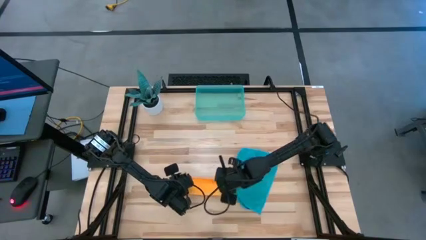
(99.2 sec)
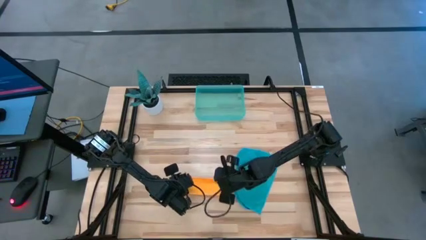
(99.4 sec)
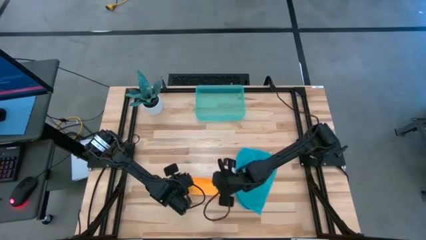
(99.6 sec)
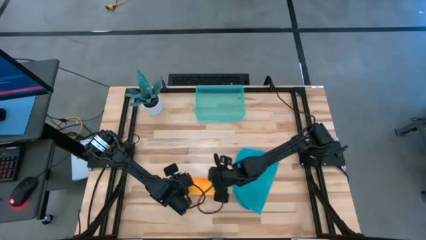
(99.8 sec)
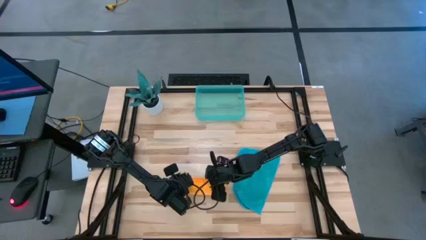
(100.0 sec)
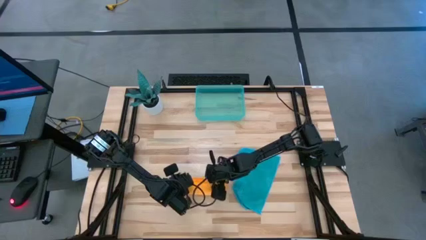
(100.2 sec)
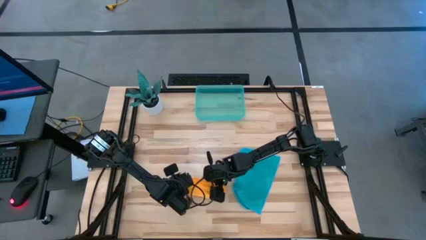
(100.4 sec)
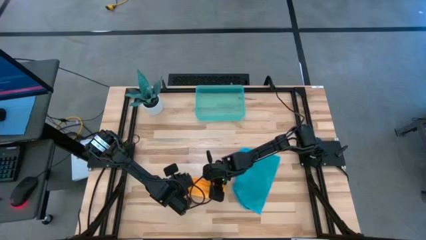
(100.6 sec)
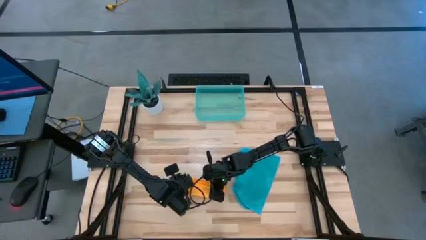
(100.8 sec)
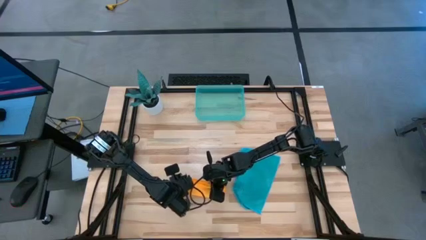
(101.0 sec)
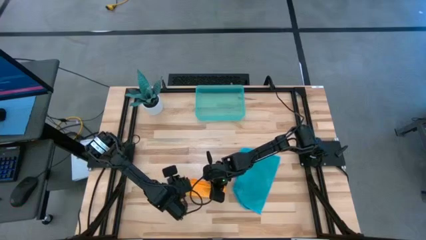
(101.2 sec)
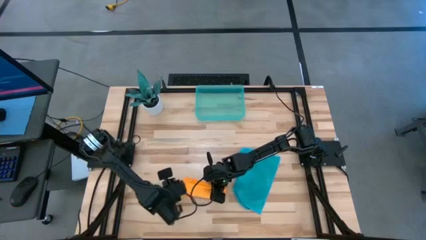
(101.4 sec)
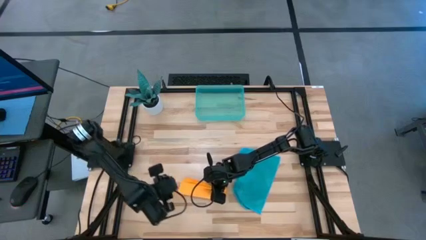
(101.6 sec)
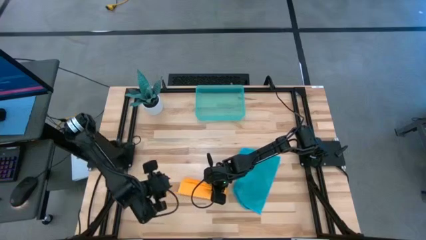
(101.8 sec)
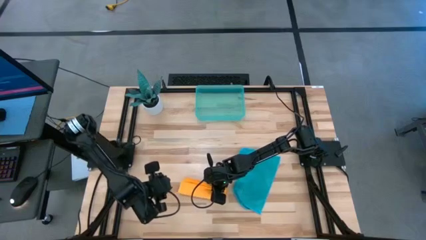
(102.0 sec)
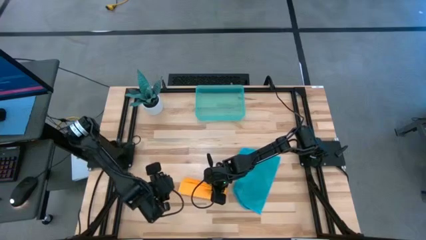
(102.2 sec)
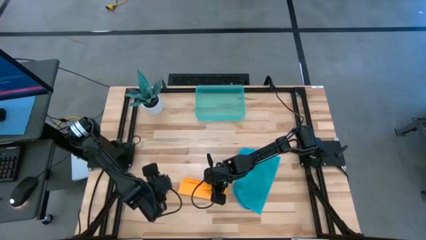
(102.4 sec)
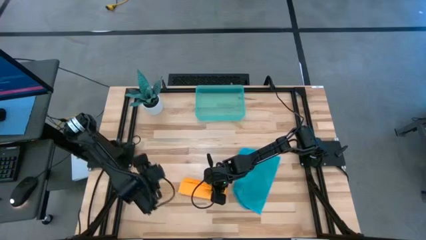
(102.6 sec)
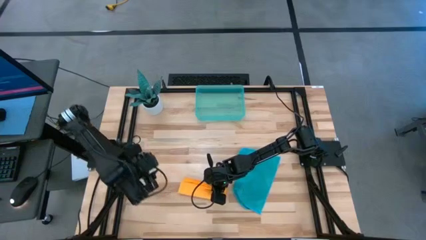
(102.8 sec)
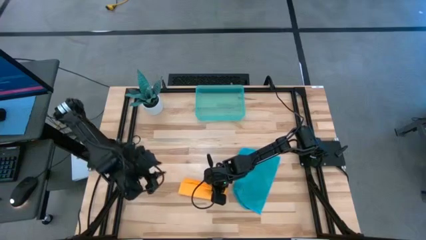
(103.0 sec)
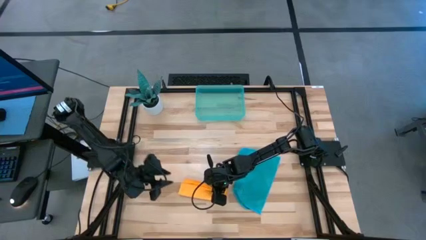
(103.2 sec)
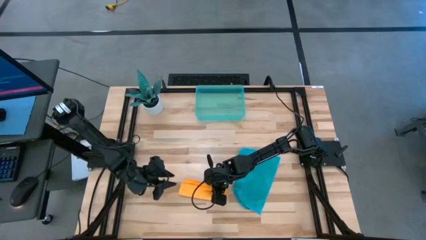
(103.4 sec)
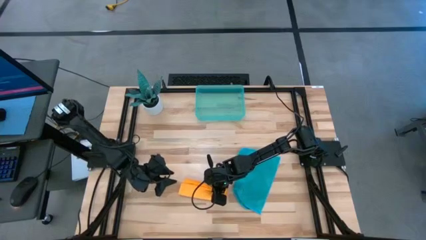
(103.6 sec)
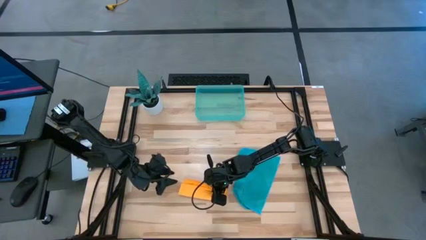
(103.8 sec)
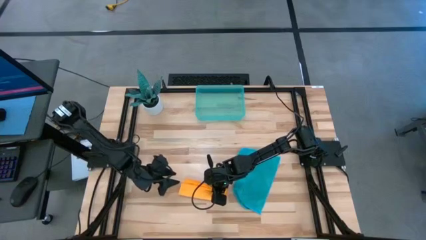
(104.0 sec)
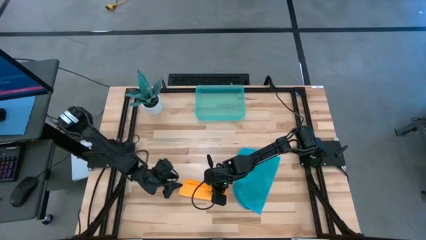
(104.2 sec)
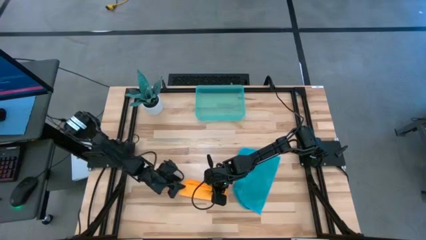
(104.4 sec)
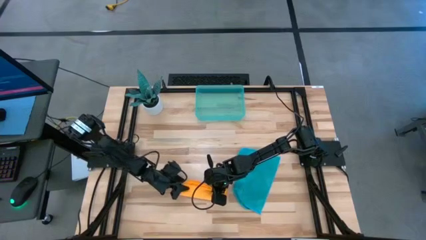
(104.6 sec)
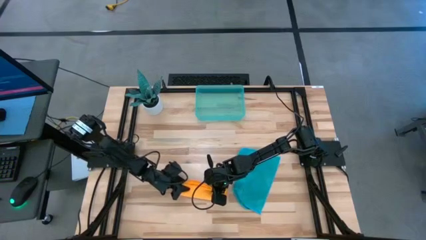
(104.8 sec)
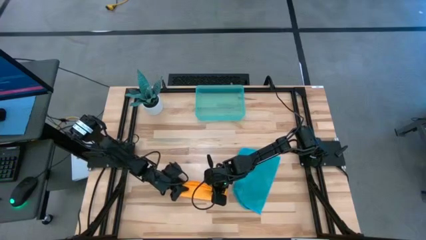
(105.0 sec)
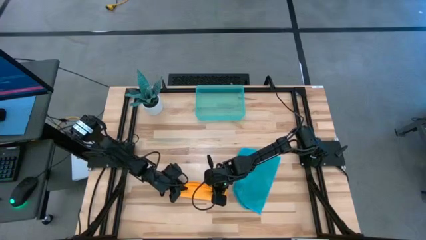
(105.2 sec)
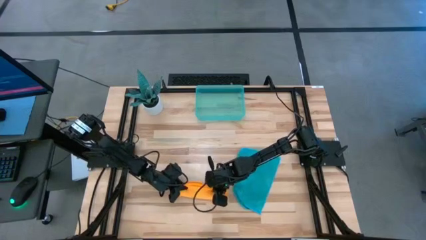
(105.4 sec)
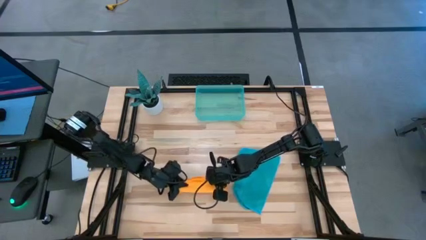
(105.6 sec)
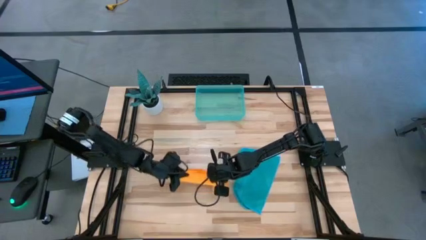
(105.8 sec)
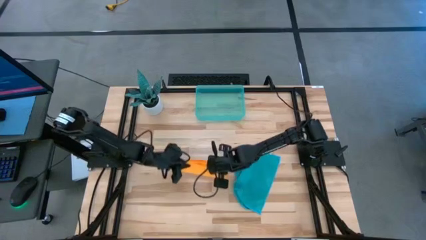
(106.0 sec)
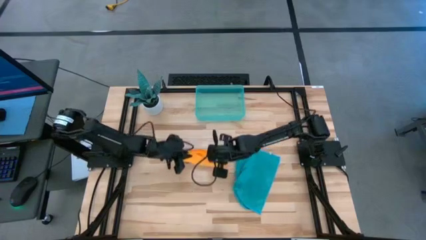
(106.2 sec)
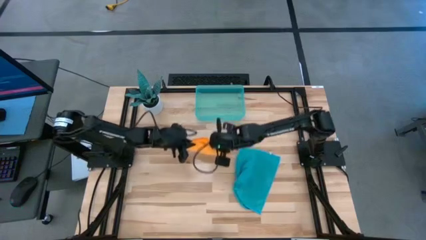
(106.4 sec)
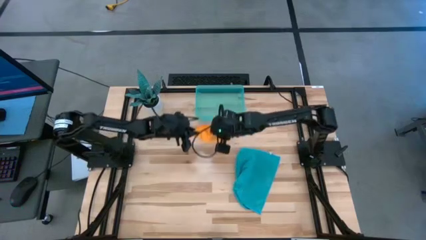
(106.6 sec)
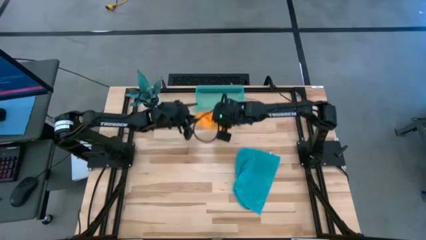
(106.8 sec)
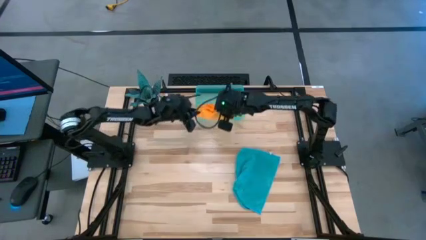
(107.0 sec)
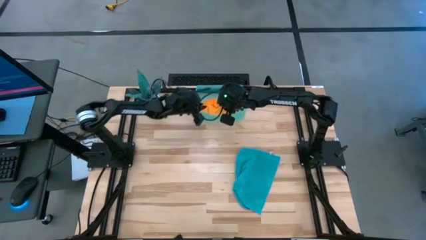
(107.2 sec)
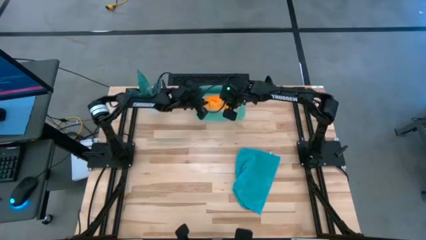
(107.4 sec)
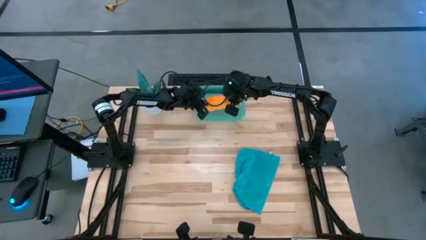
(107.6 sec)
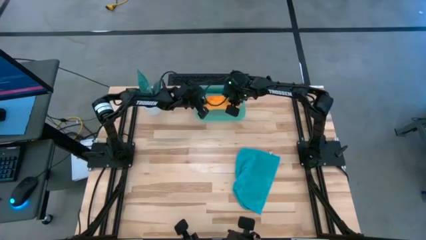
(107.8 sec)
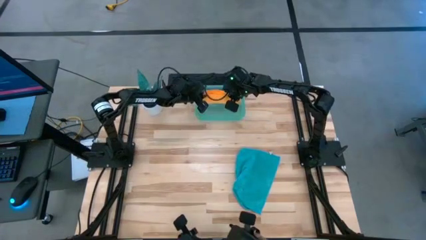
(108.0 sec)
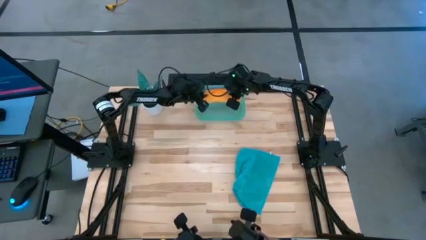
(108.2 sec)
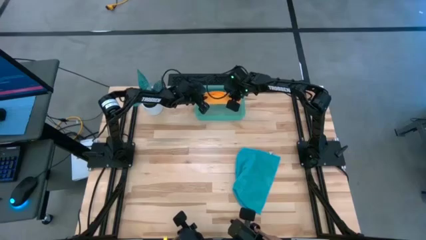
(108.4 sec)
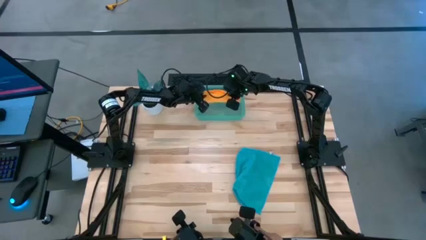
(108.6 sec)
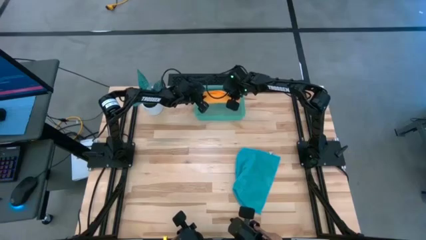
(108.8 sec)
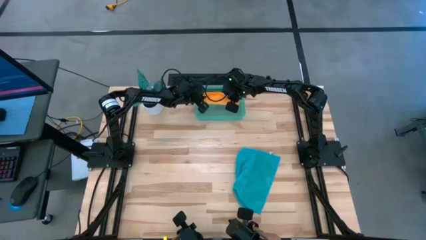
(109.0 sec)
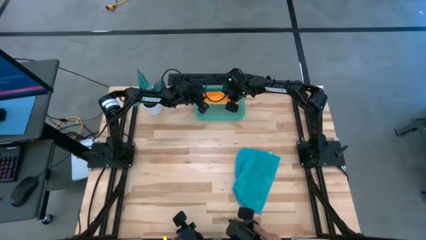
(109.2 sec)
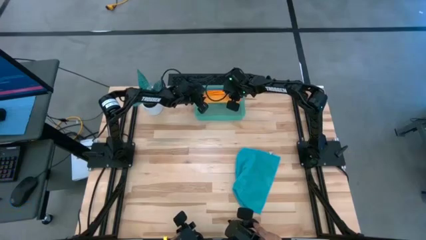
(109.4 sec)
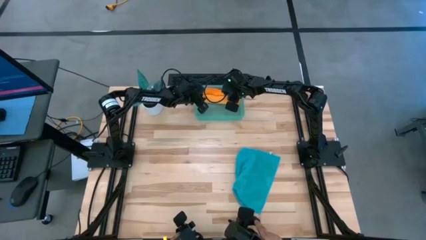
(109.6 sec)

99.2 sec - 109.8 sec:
Task: Roll microfiber towels into tight, uniform cylinder then place into a basket
Put the yellow microfiber cloth into the blue bin

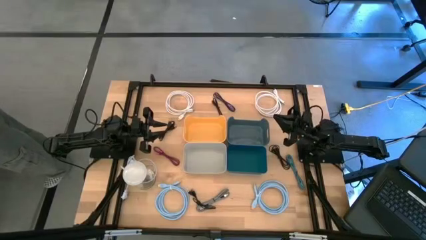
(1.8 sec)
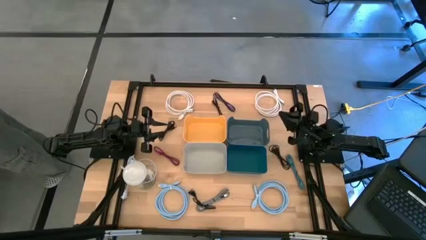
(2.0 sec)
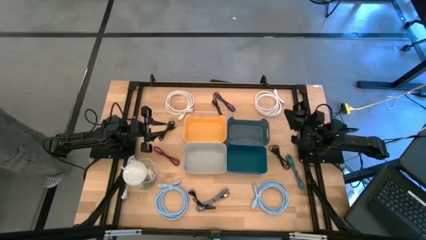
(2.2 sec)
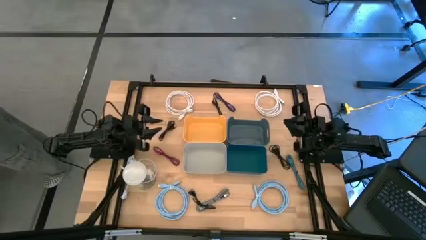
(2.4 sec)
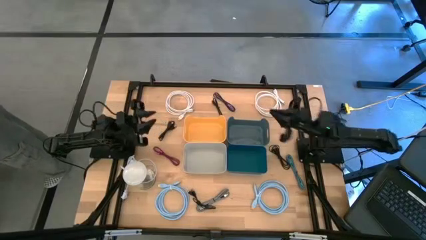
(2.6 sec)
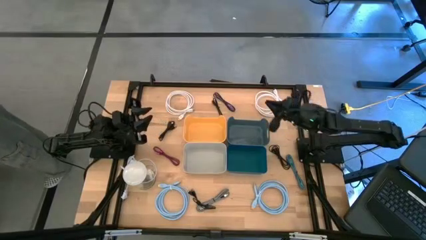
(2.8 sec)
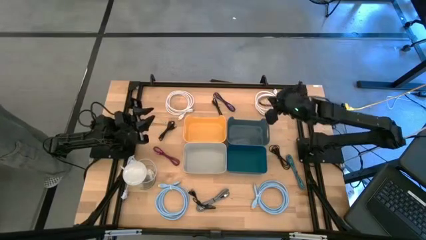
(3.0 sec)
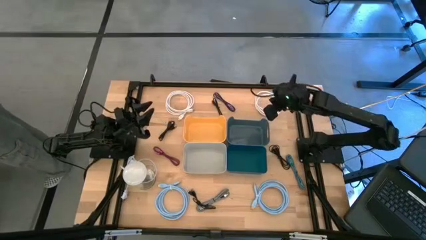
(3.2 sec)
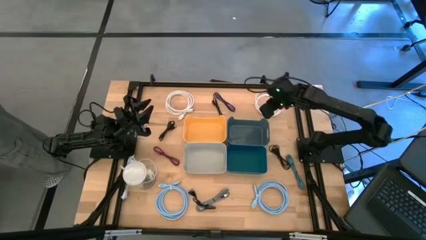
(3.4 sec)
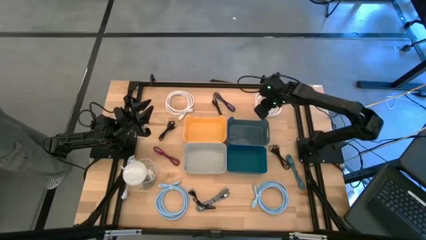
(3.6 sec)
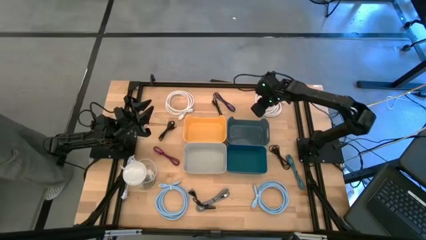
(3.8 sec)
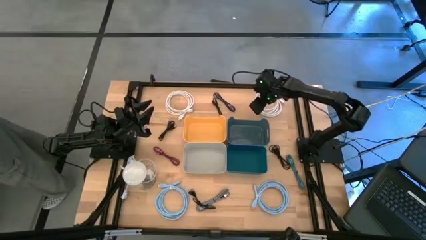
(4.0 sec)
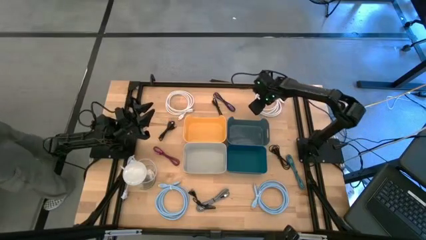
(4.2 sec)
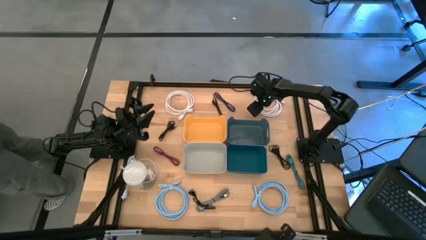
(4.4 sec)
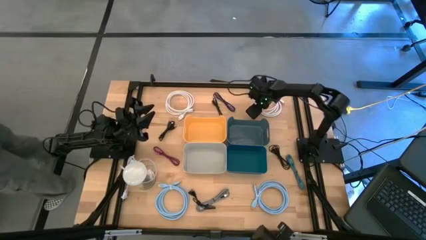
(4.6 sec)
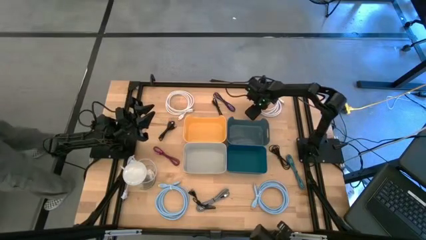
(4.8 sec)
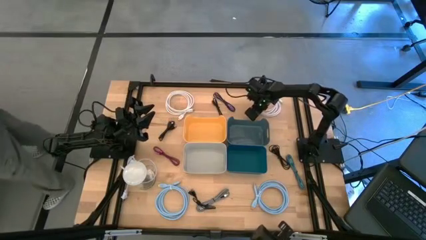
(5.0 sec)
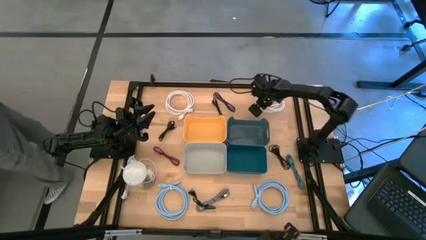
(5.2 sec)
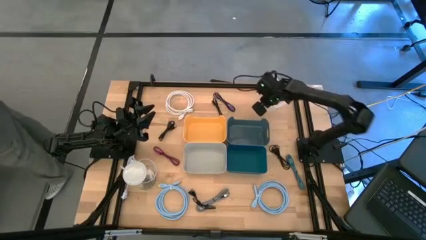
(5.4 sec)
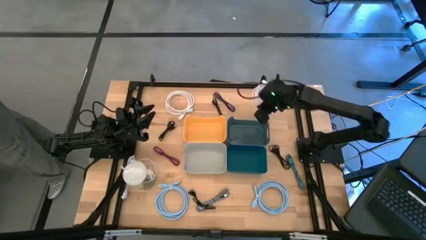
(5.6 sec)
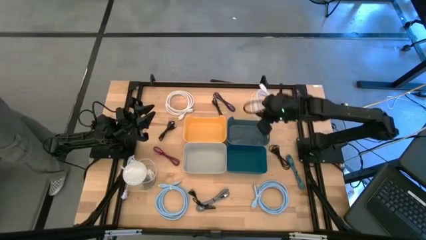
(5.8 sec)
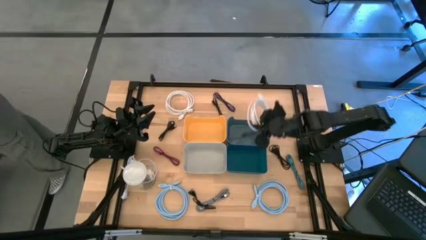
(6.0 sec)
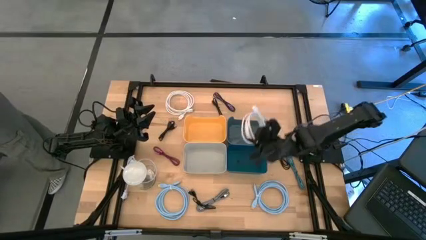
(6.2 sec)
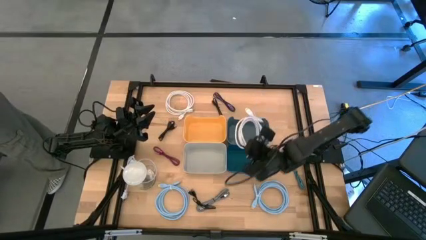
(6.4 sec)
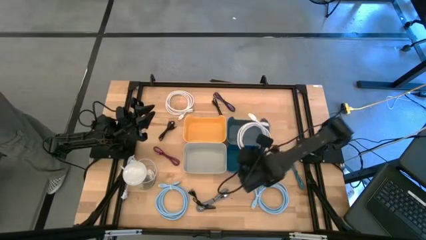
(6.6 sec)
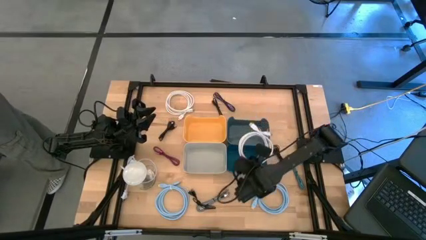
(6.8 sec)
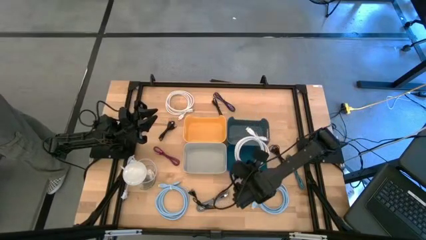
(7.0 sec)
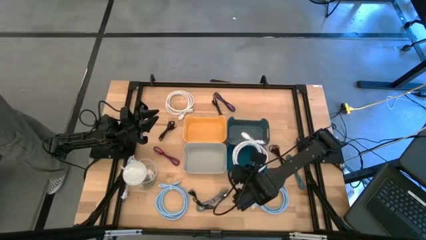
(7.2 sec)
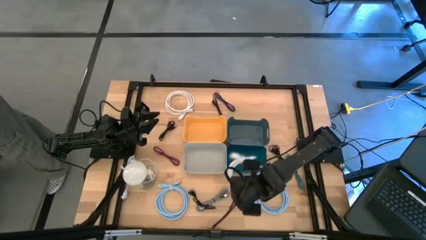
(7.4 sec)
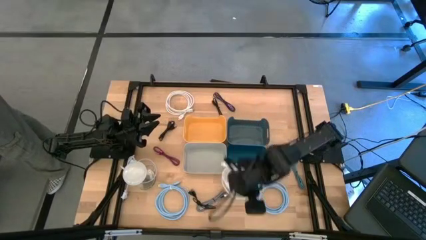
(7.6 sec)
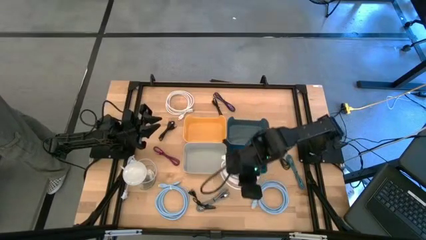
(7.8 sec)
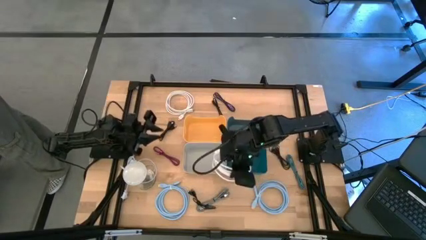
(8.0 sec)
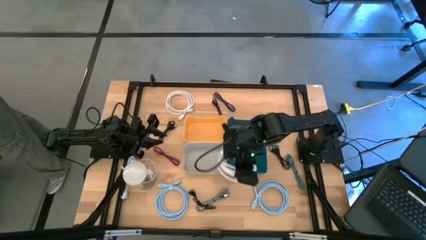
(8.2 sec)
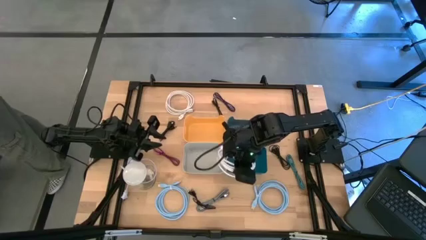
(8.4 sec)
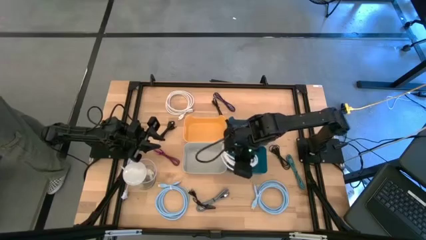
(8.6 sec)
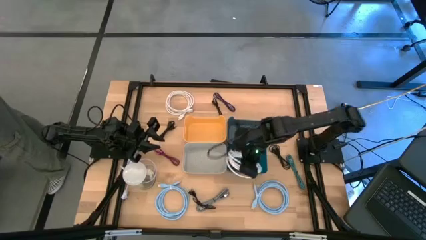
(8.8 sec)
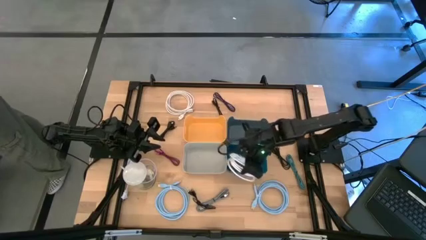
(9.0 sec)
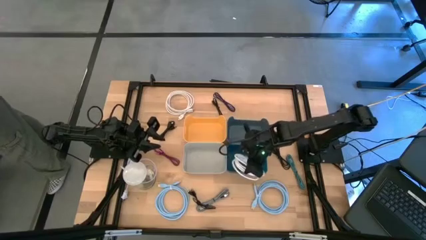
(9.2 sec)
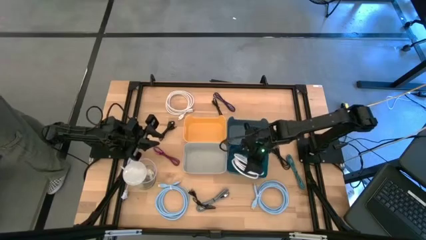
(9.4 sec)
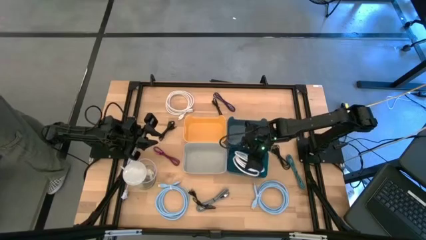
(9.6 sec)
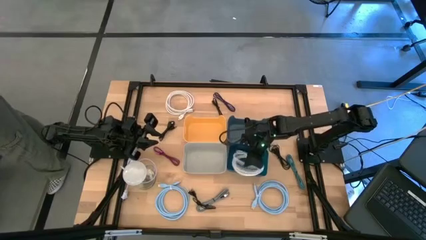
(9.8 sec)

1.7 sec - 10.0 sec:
Task: Pick & Place USB Port
Put the white USB cable into the blue bin
